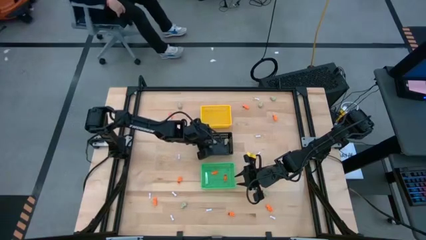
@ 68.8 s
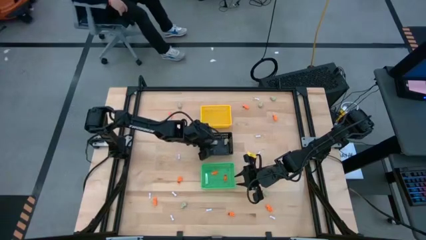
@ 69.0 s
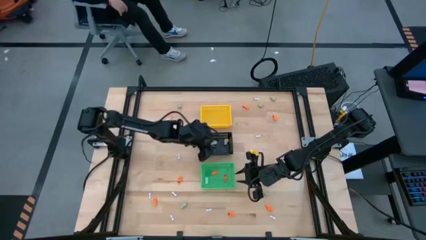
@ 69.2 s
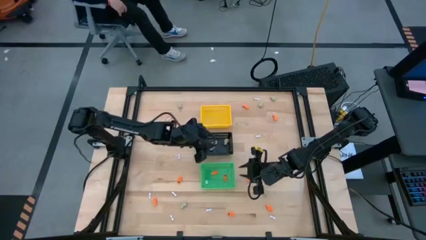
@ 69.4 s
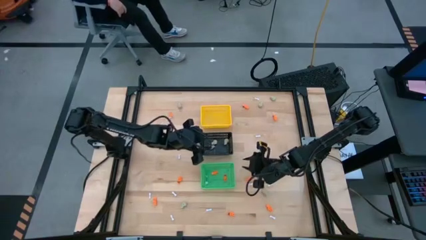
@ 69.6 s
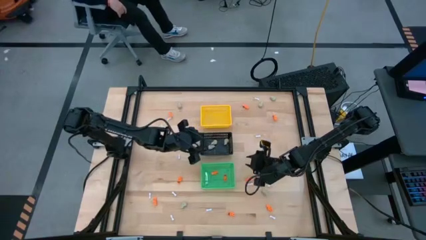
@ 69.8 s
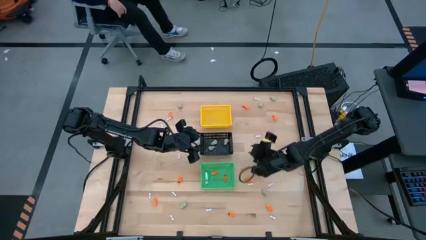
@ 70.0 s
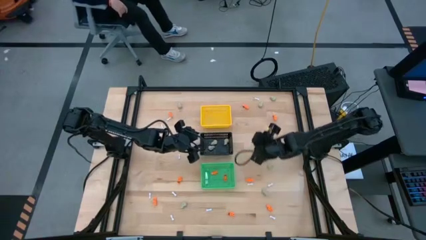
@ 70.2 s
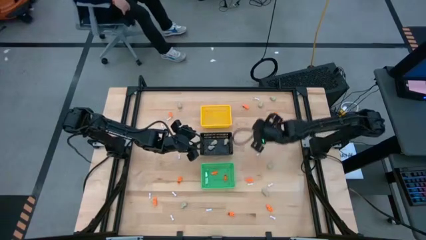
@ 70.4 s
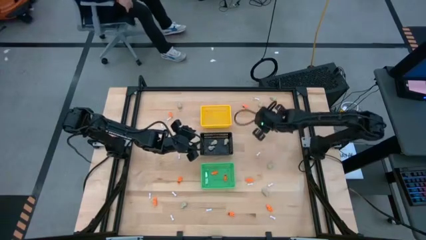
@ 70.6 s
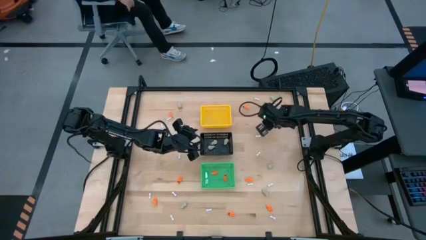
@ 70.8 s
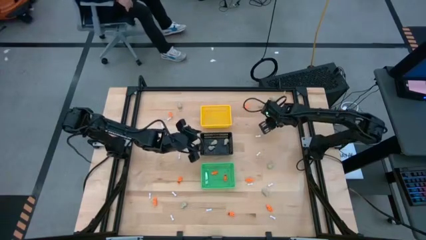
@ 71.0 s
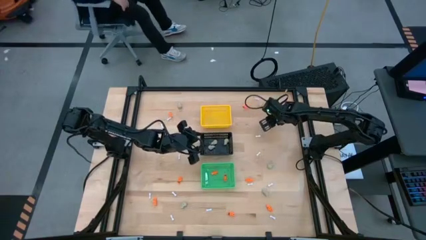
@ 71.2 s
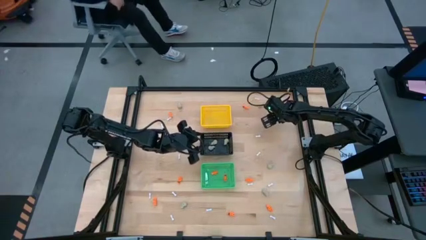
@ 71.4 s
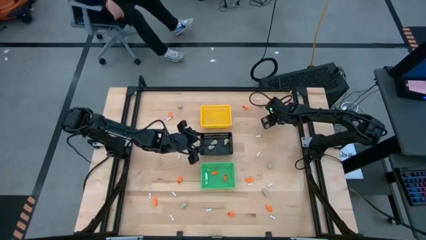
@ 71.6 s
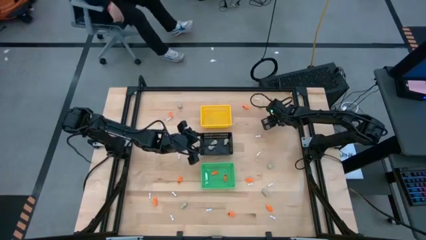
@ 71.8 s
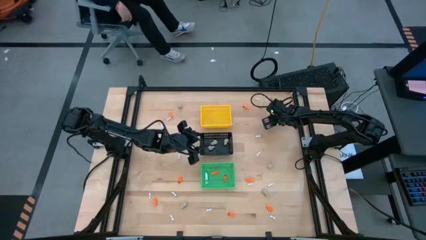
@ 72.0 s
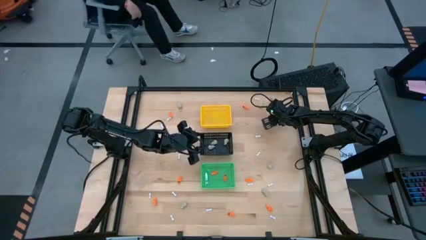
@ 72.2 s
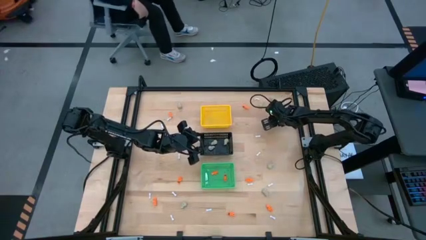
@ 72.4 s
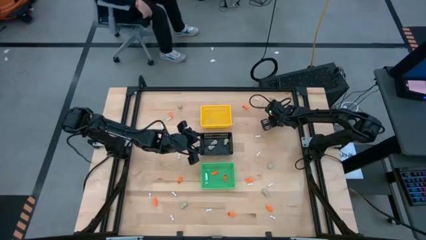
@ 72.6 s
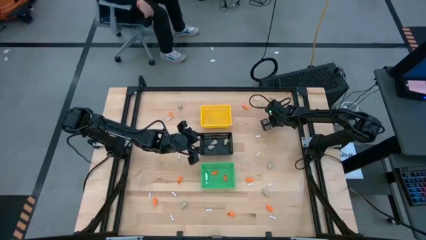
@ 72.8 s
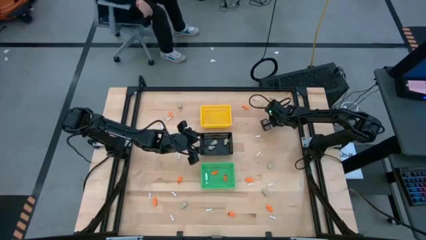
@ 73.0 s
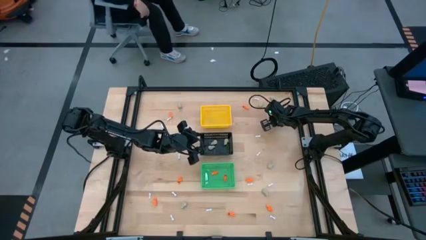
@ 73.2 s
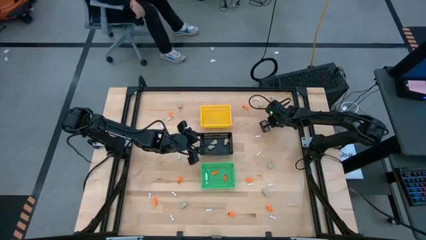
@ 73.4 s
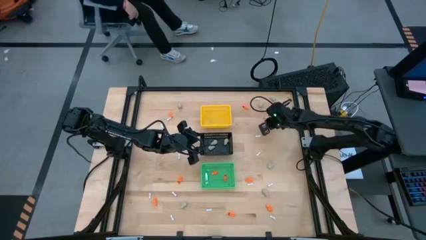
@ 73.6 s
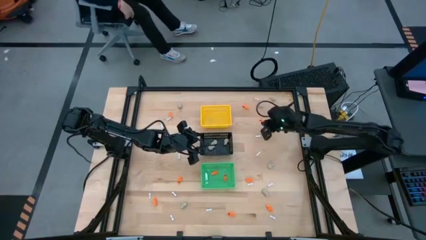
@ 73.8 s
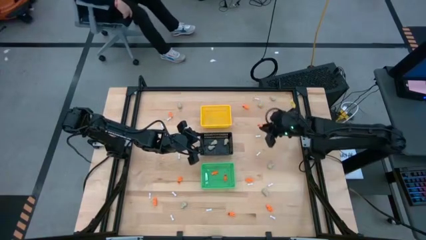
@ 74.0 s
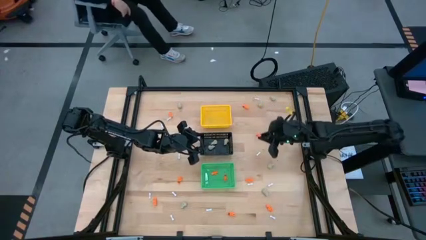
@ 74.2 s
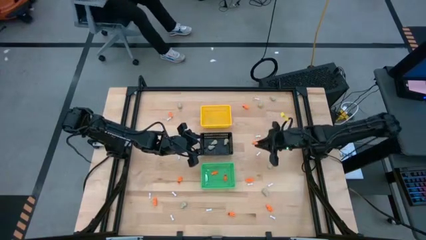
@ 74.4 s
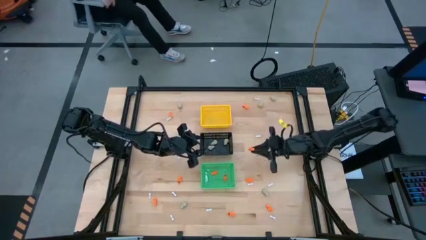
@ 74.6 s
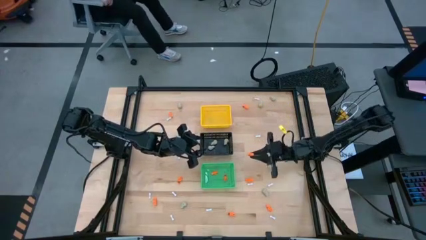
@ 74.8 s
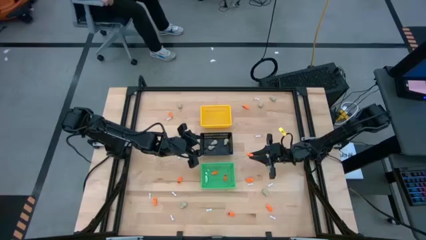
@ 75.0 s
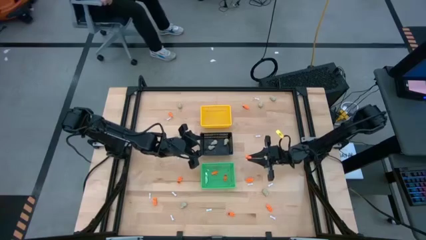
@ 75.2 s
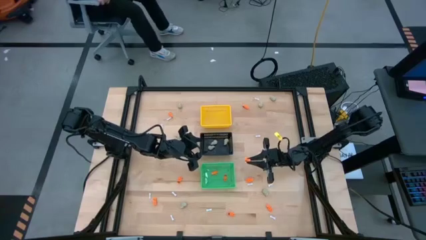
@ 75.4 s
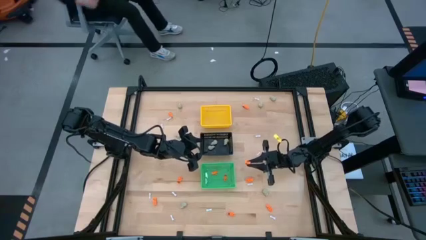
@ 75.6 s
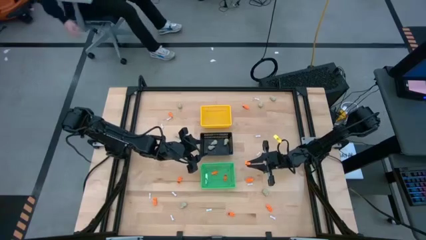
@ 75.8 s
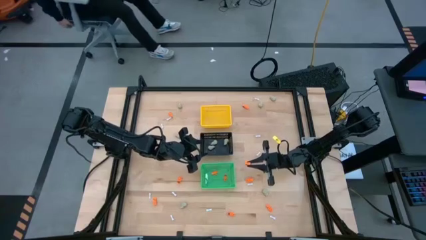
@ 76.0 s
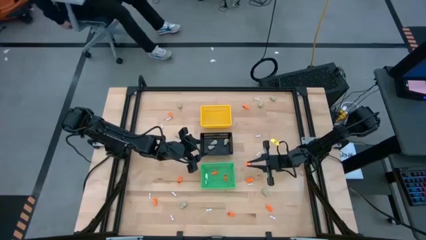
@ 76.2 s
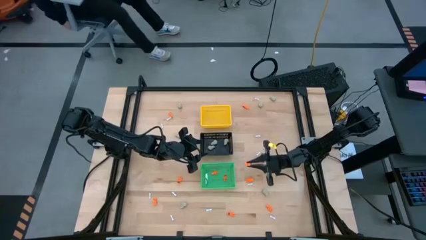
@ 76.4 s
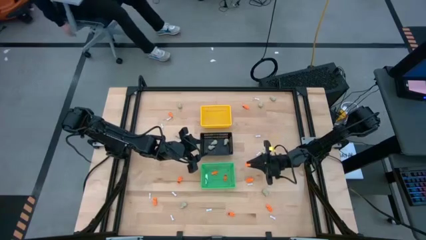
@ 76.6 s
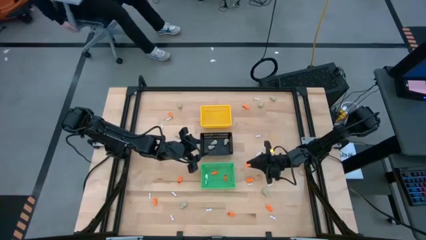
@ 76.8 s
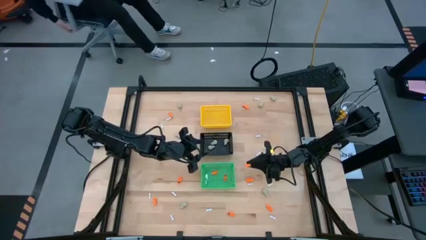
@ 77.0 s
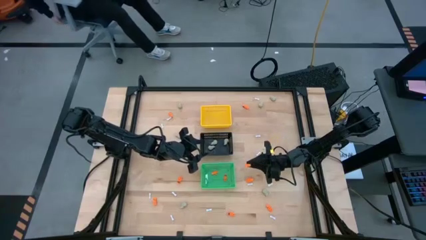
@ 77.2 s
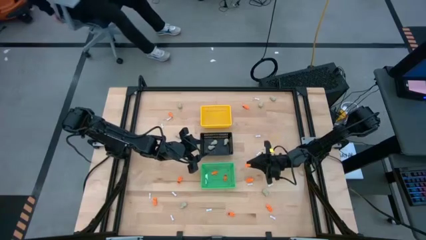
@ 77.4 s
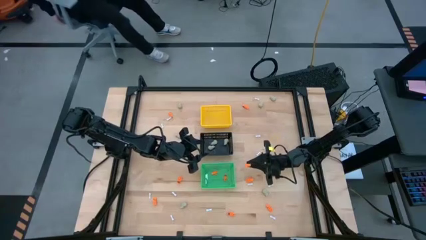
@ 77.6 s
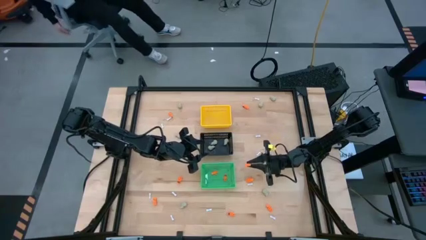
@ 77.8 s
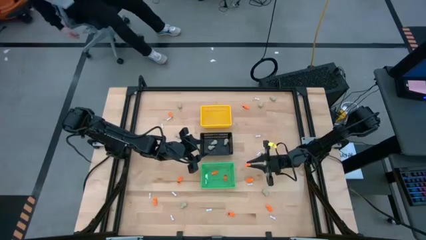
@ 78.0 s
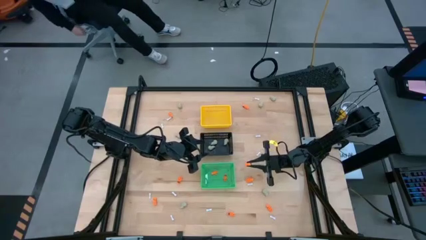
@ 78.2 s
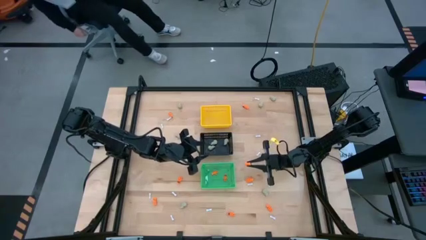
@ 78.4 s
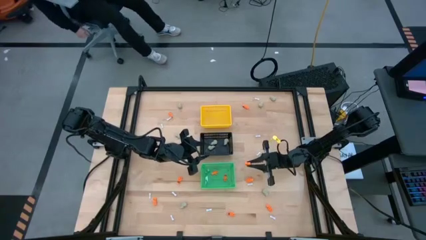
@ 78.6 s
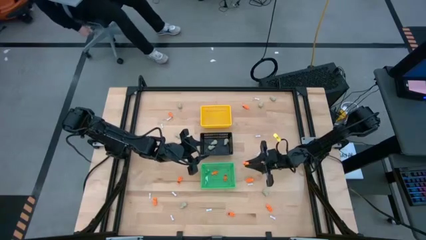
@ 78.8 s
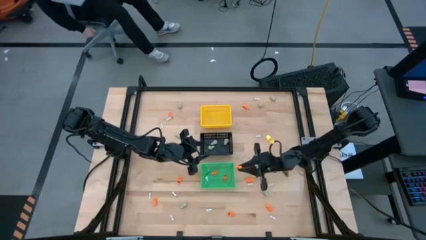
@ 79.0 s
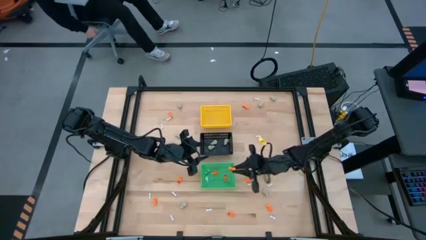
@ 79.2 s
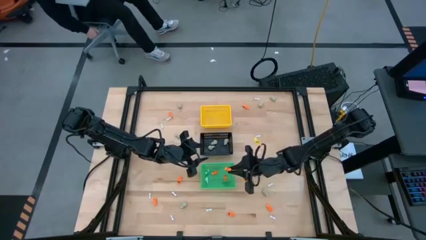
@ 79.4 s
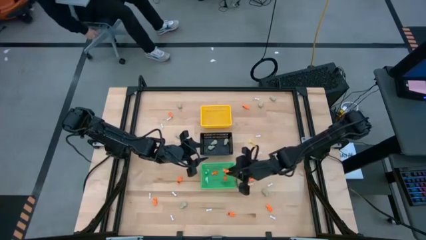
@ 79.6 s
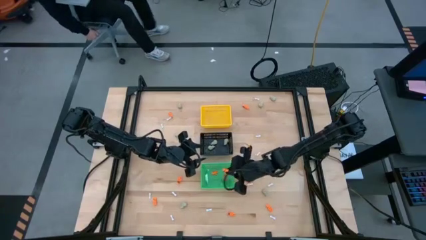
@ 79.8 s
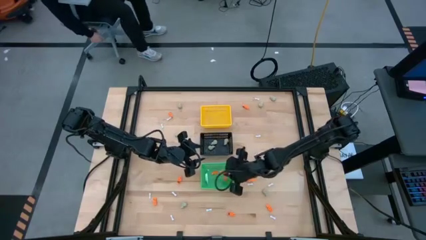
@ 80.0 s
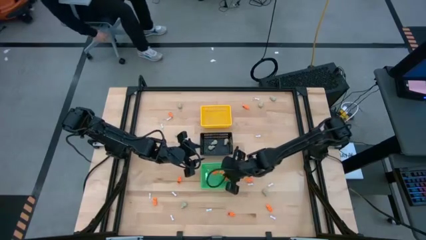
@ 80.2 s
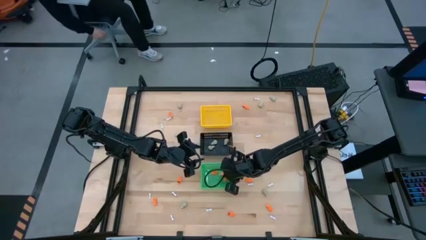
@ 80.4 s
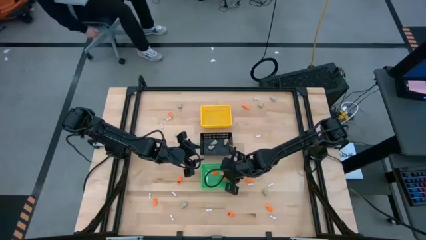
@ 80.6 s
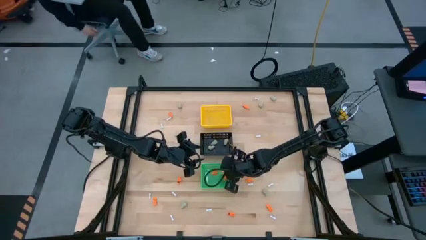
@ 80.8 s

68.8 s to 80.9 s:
Task: Sort Halloween decoration
Put the orange skeleton toy into the green basket
